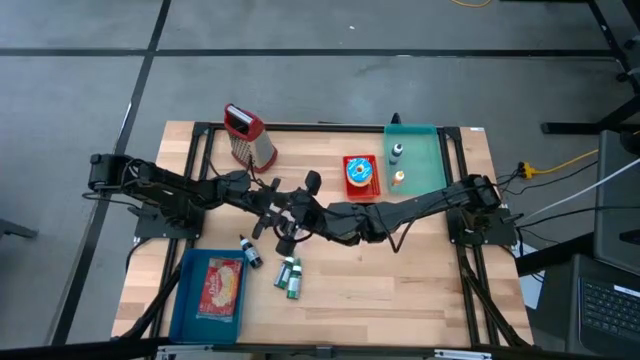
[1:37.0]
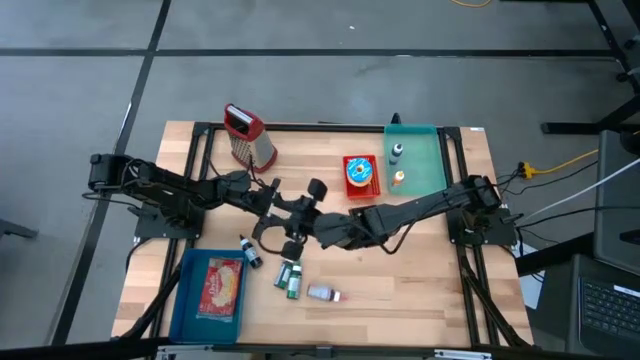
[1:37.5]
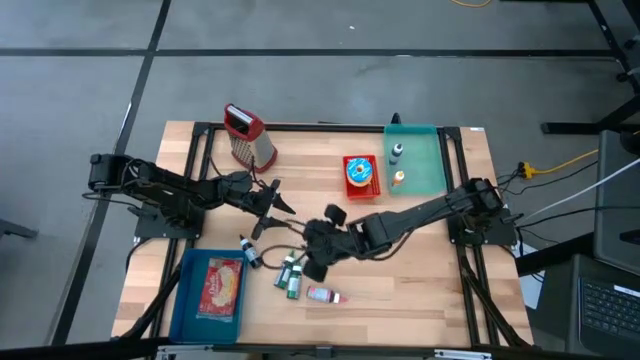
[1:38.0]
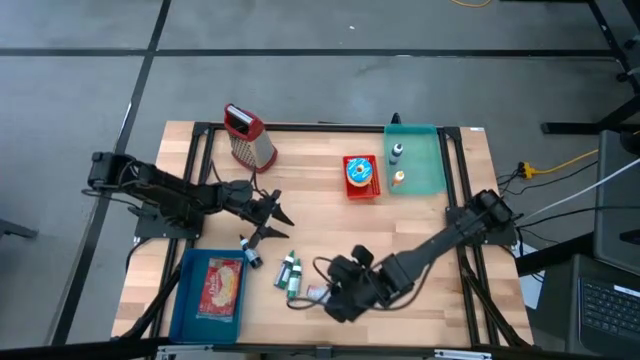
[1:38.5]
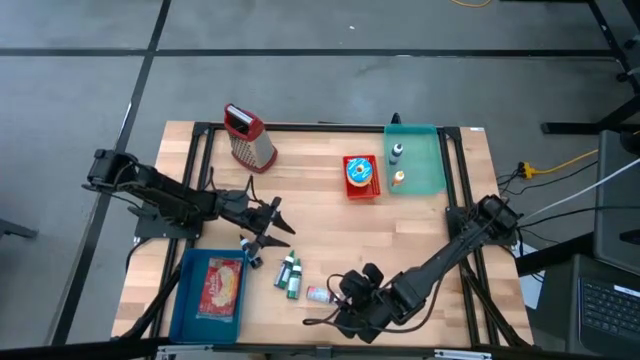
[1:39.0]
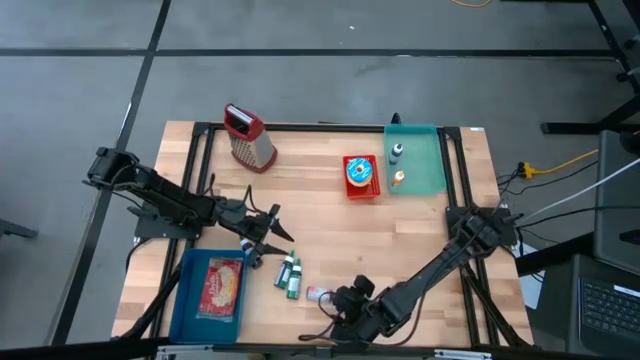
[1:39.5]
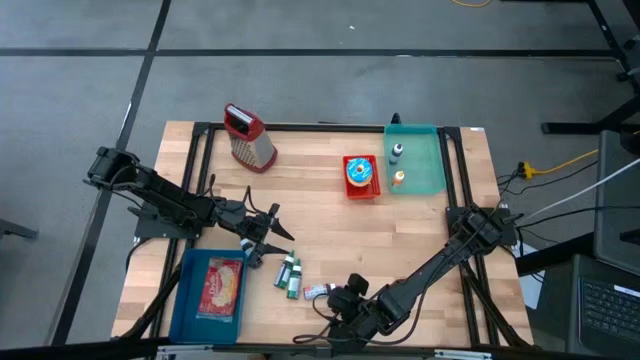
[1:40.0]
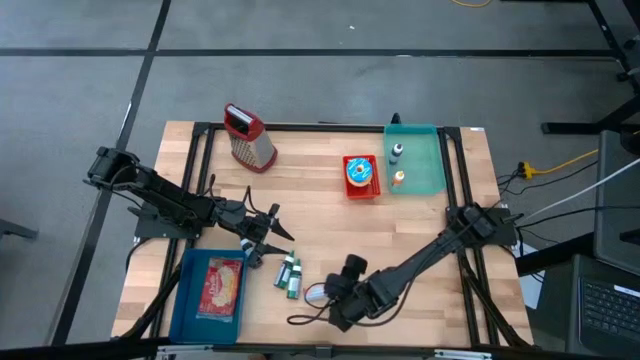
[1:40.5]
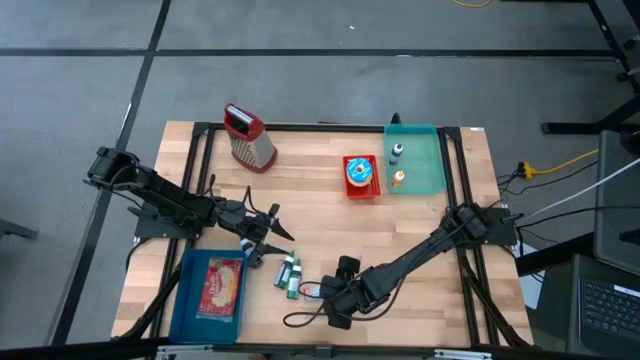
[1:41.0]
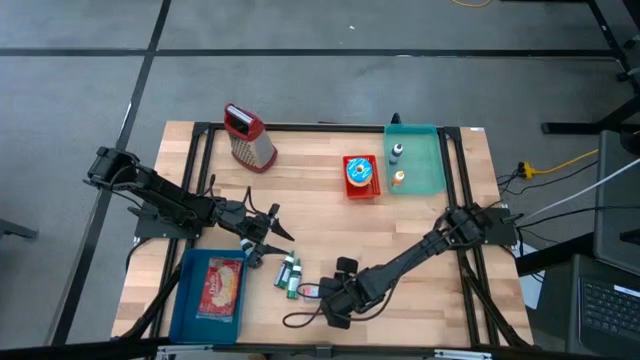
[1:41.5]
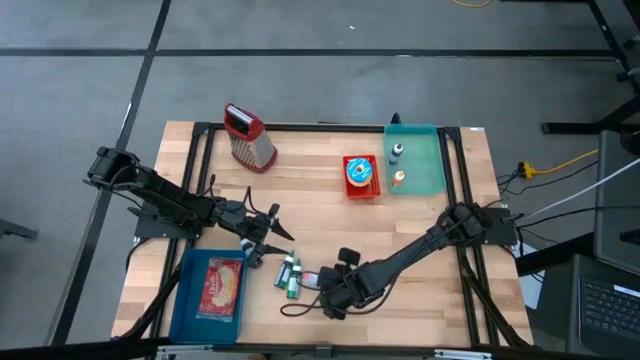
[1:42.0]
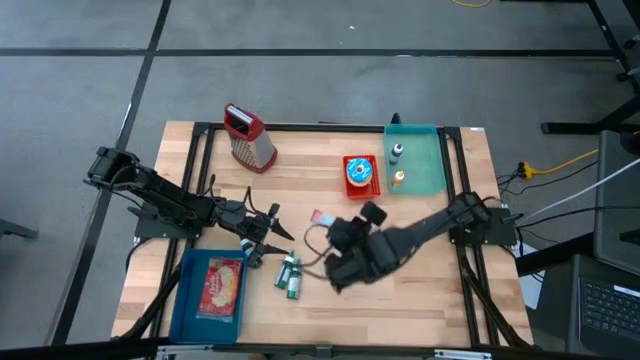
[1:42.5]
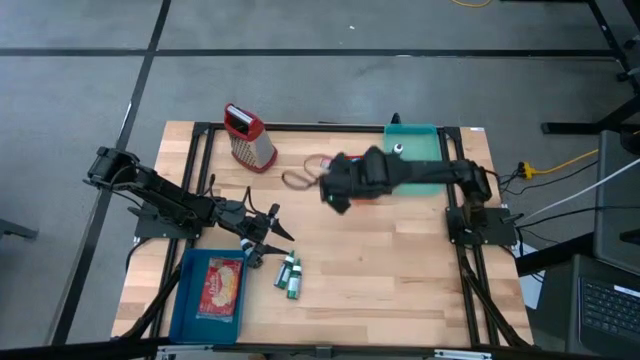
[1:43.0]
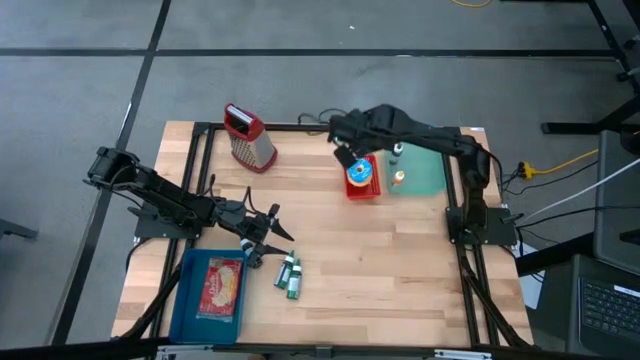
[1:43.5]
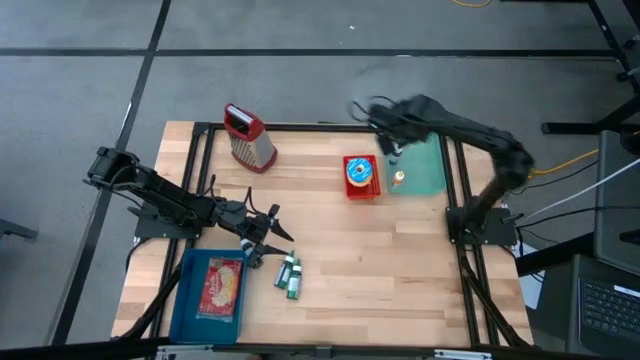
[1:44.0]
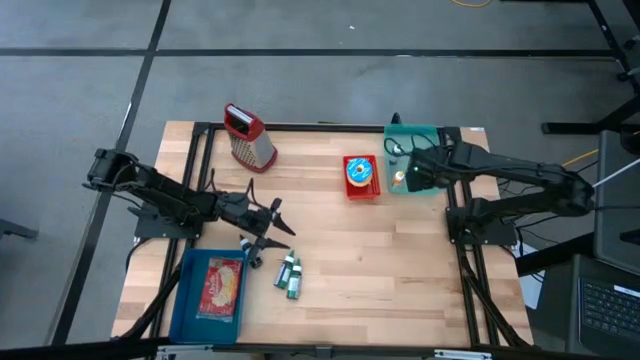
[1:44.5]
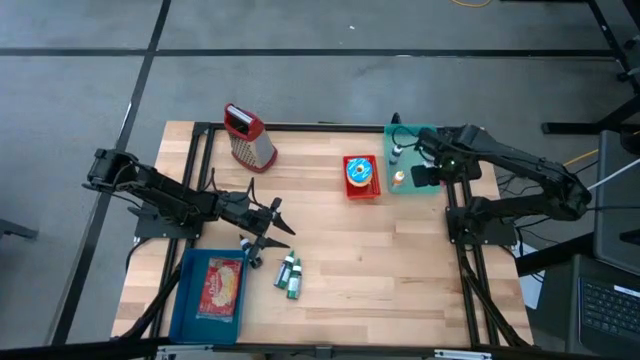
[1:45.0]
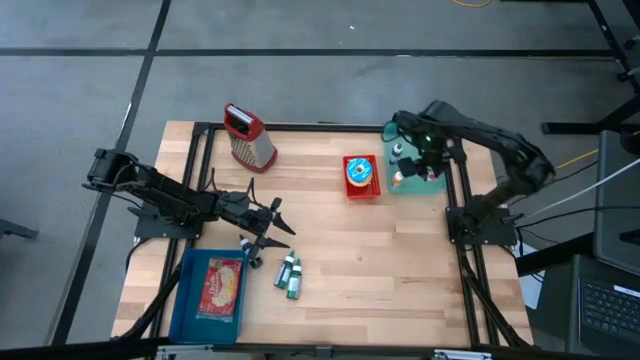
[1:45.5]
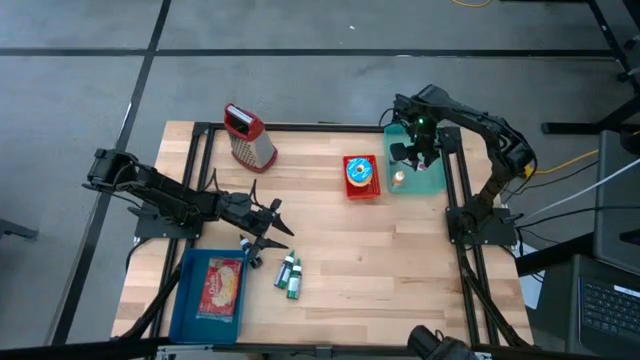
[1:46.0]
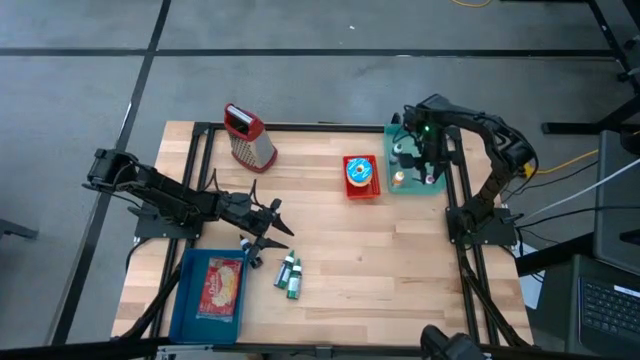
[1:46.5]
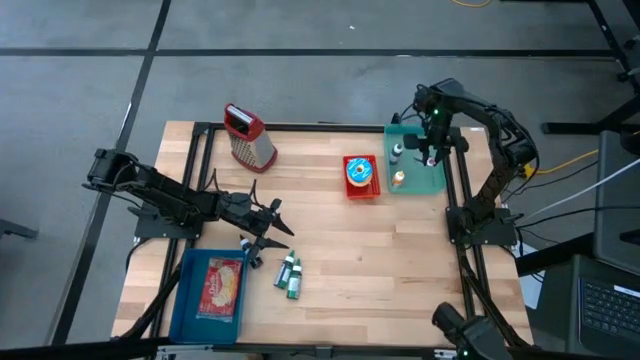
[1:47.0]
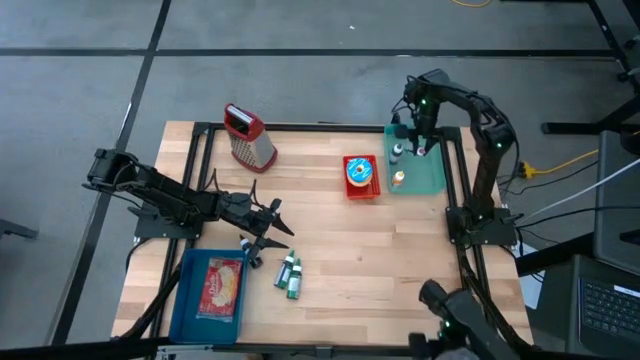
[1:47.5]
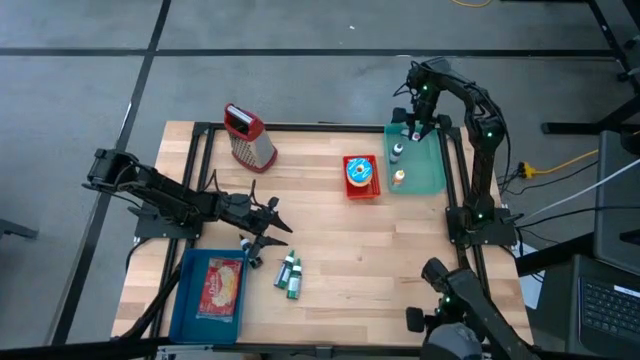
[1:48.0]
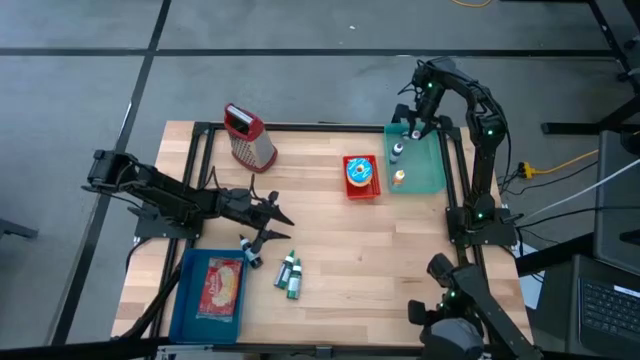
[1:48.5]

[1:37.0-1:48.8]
Put the pink food coloring bottle into the green bin
